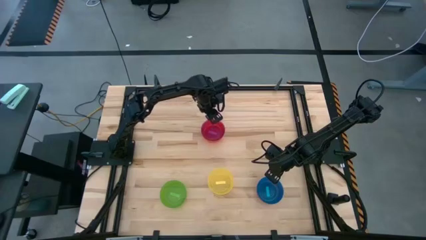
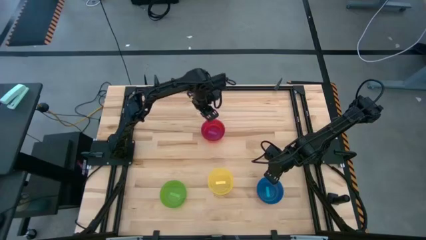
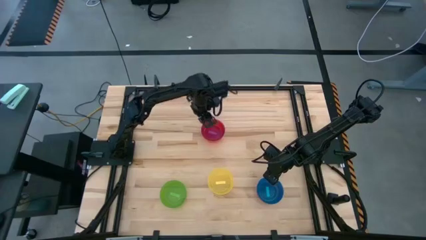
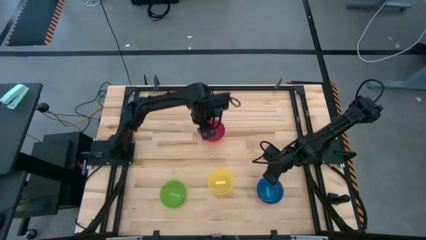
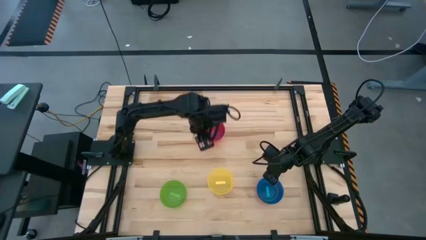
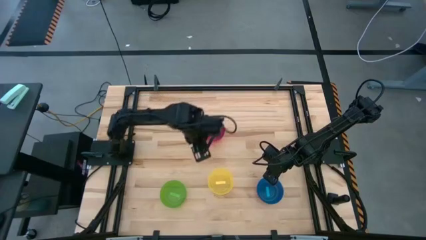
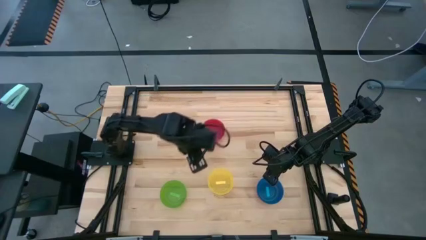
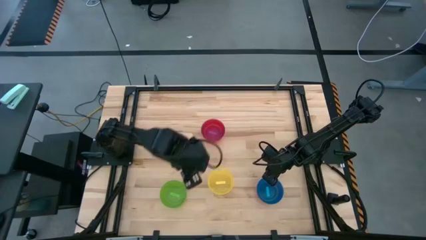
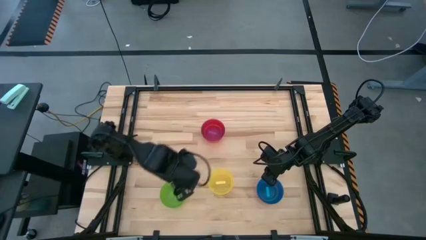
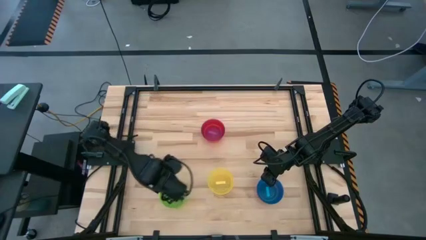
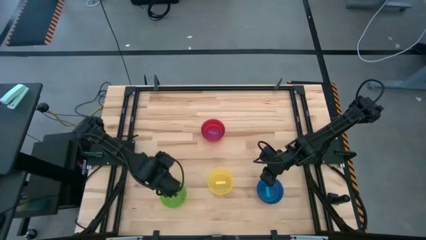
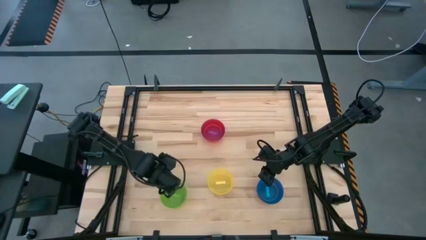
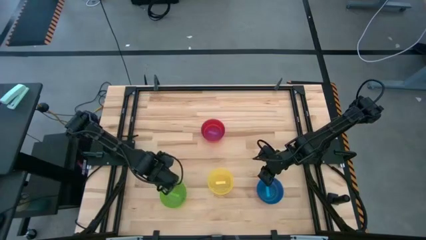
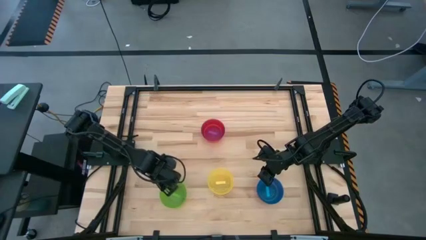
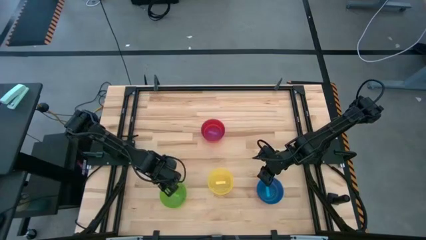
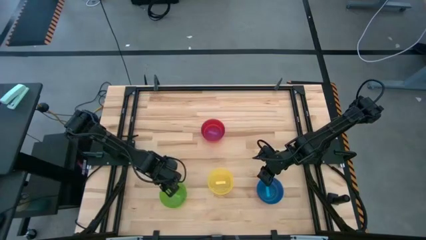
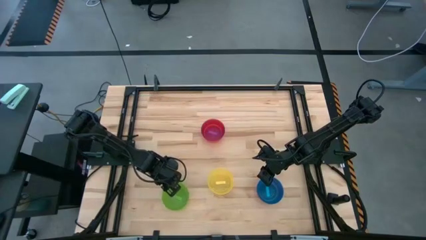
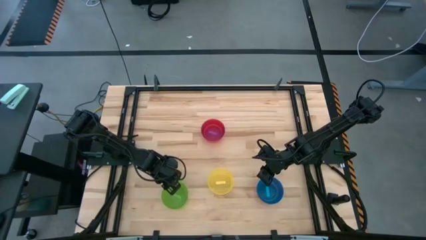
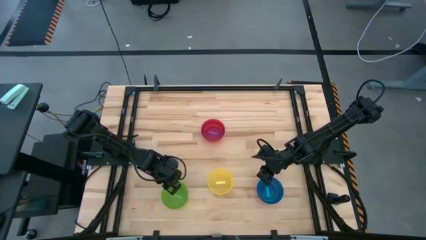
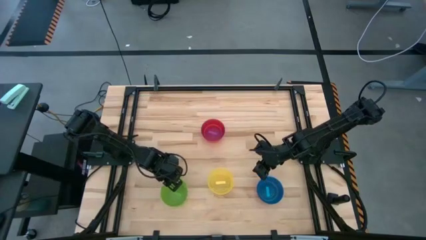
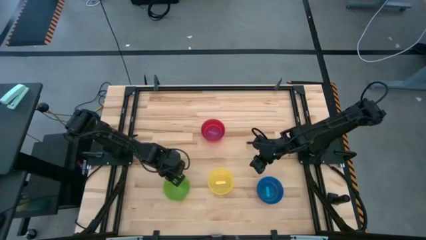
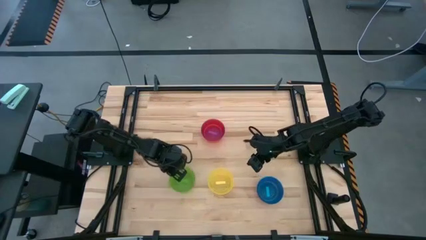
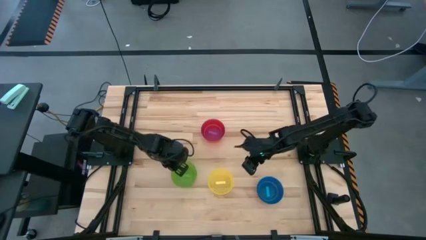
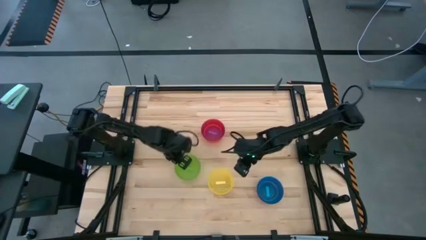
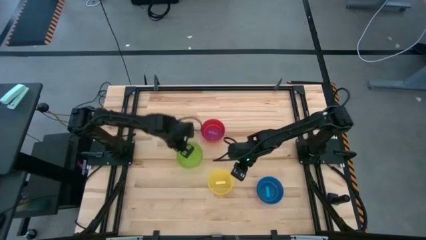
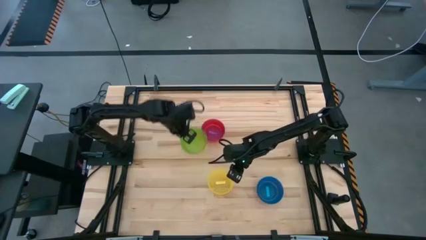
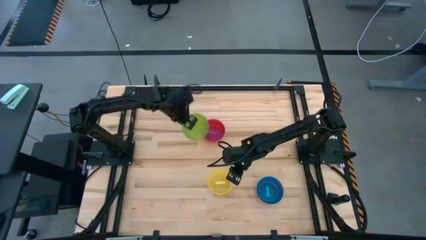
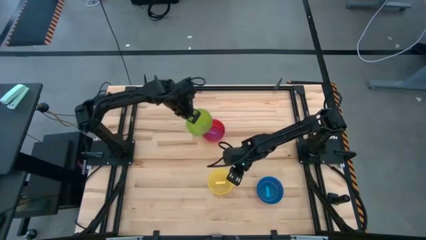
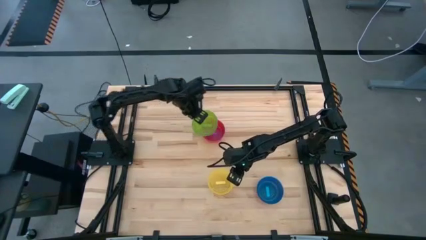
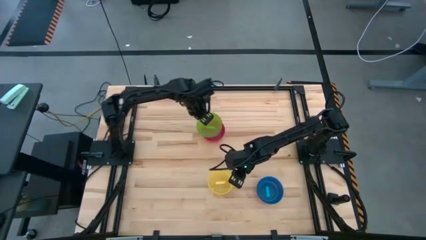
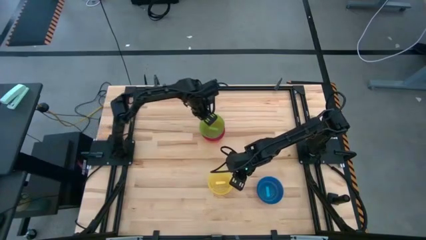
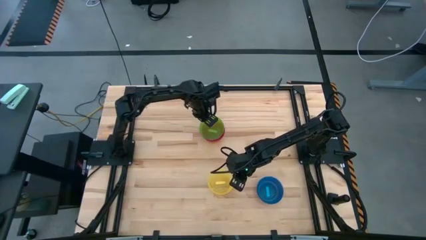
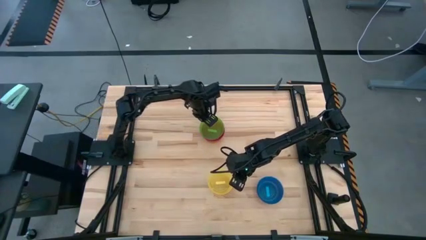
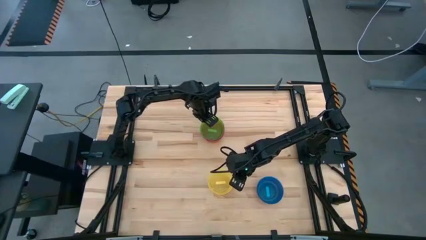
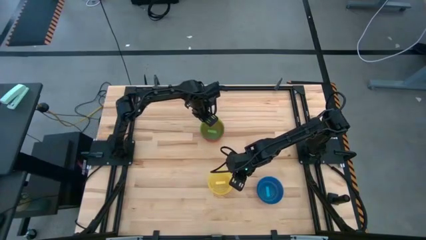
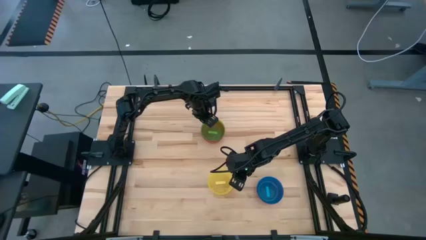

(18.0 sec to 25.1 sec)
Task: Nest bowls inside each other
Stack the green bowl on top of the orange bowl

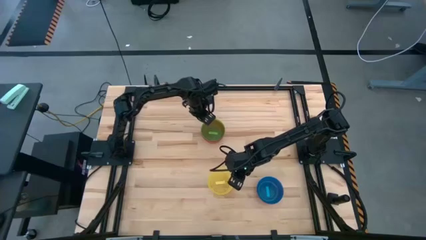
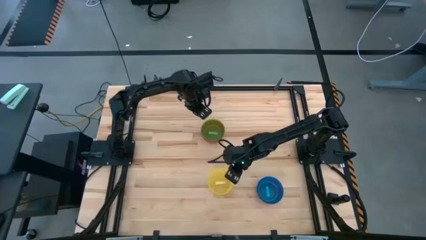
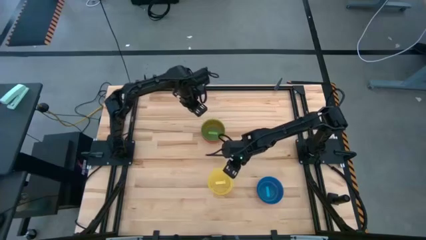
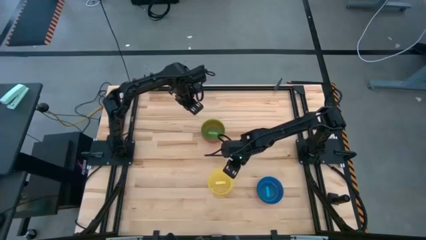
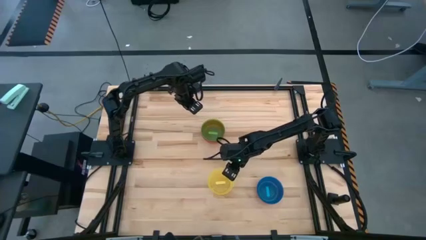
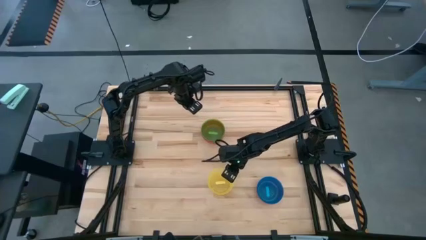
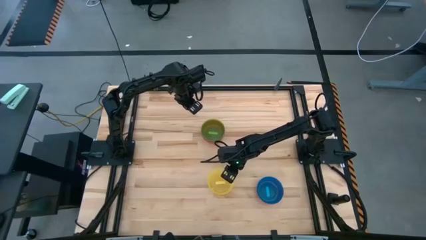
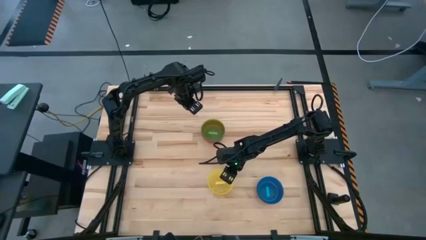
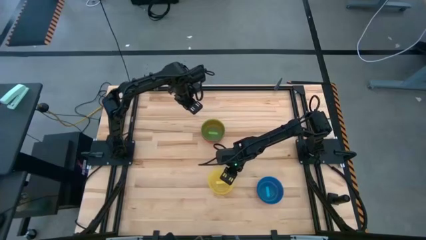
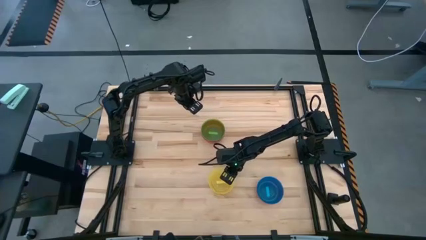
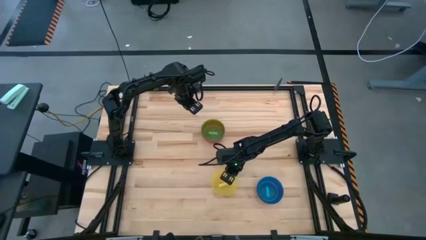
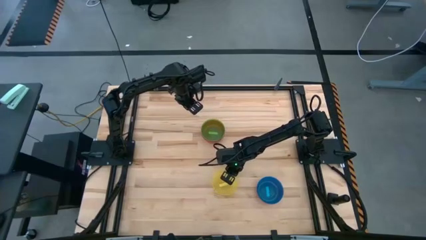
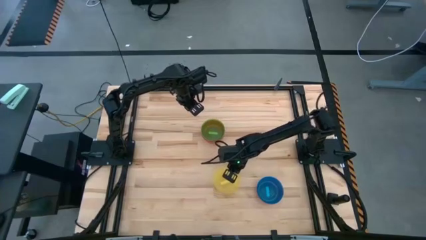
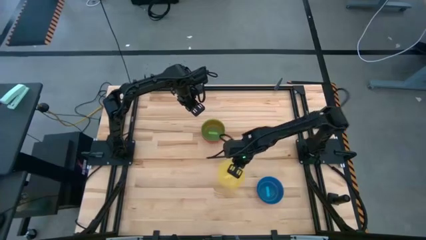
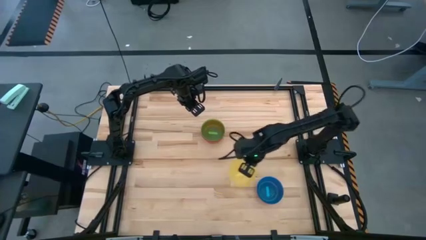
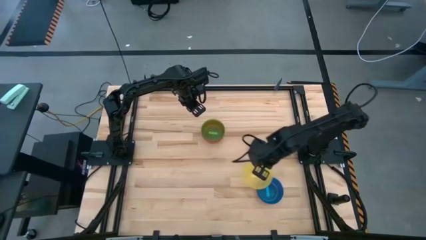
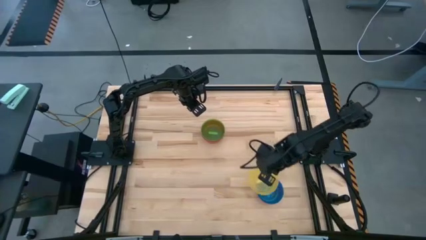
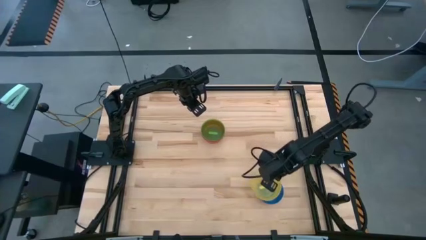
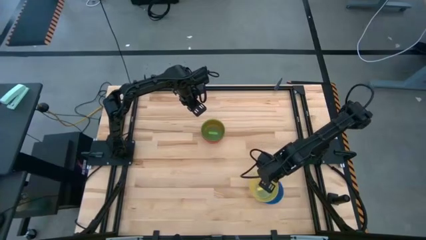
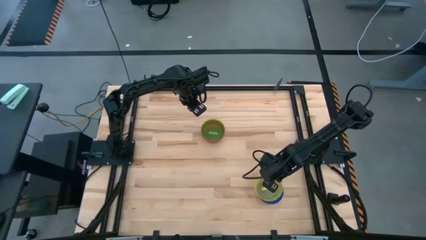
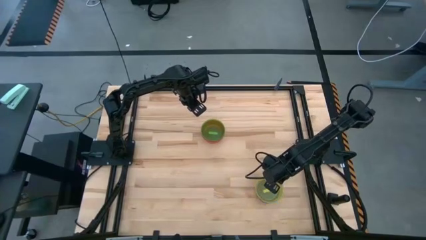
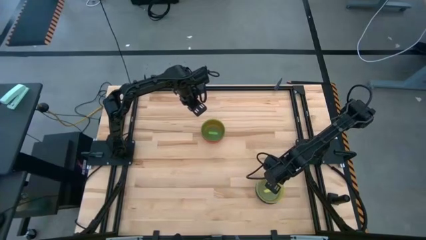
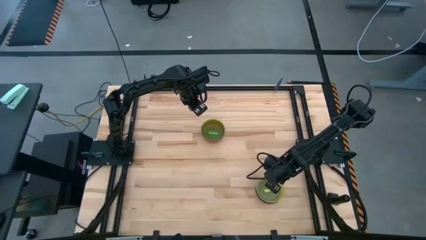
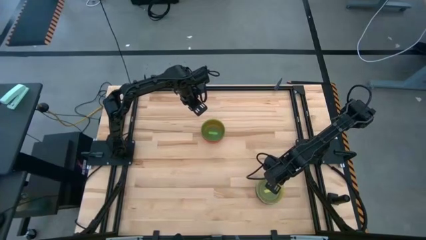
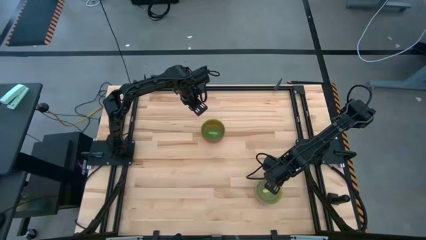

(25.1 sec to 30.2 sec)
Stack the yellow bowl on top of the blue bowl

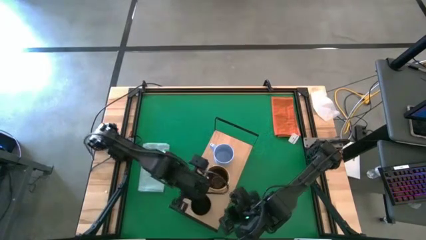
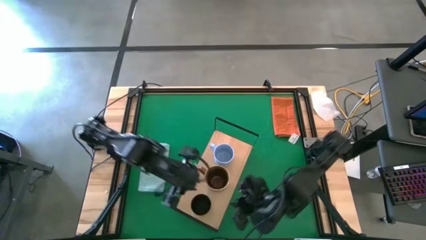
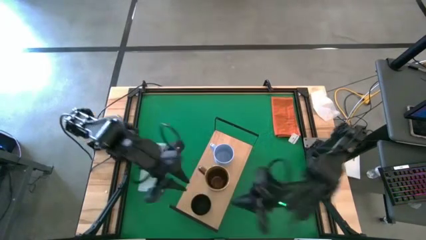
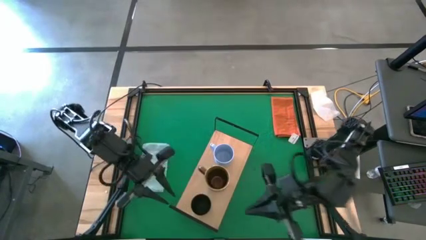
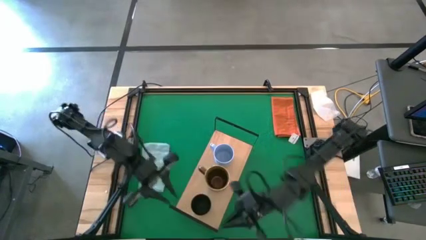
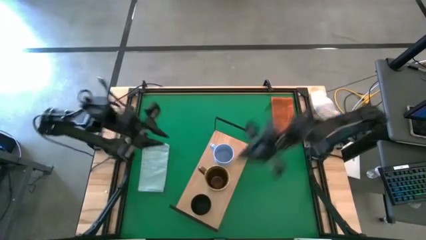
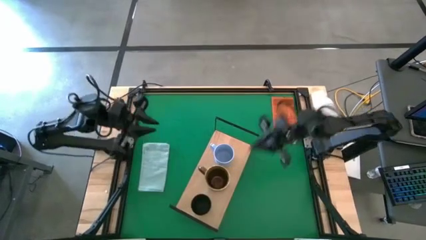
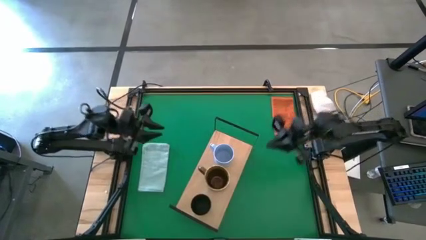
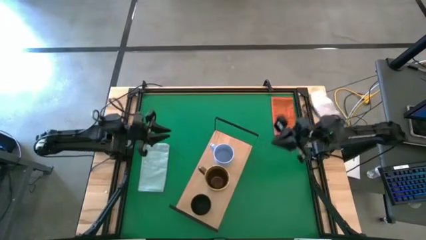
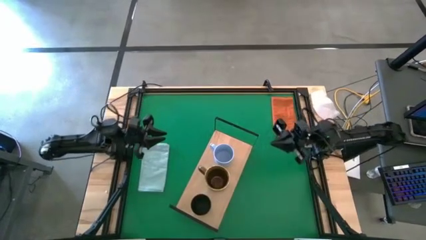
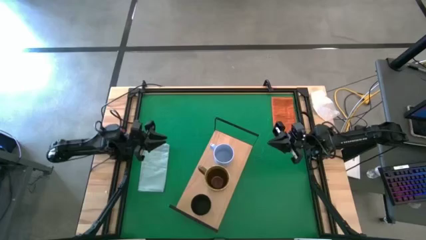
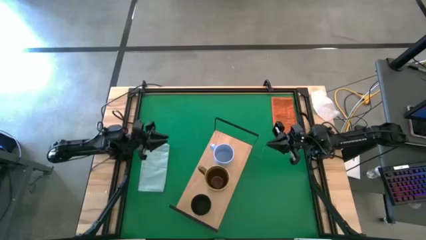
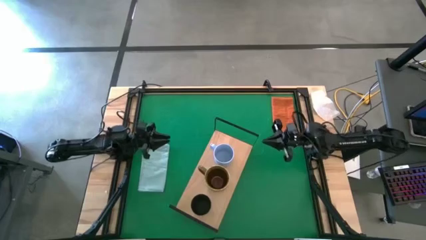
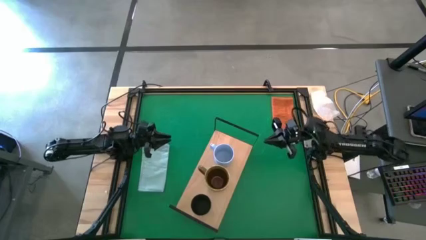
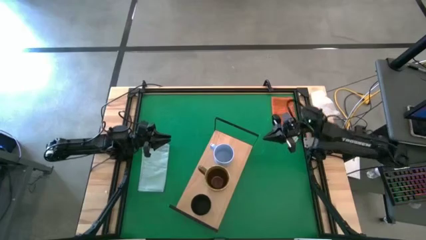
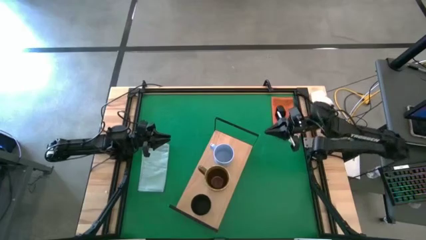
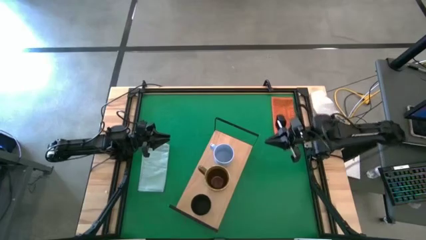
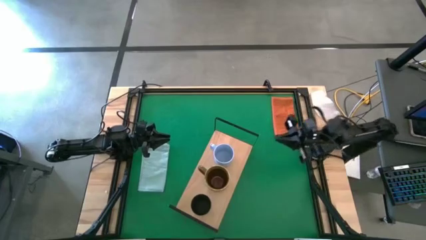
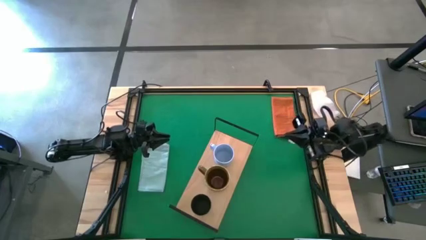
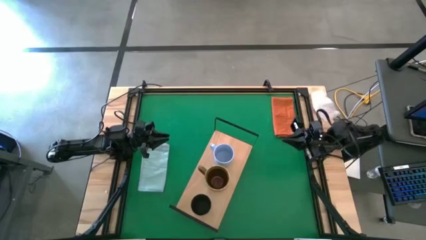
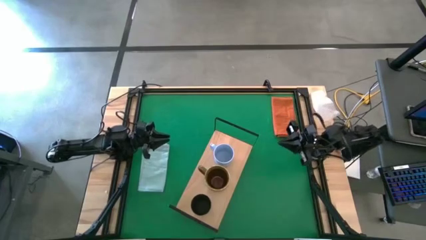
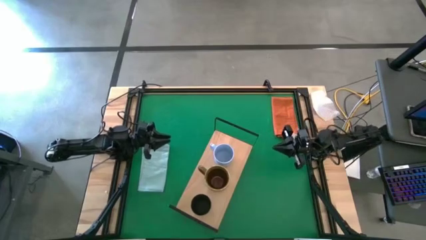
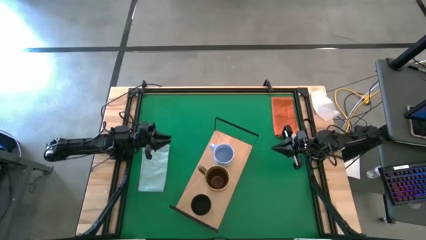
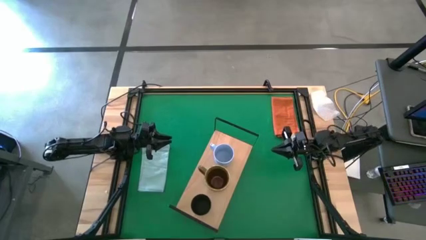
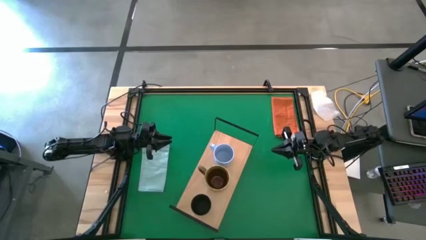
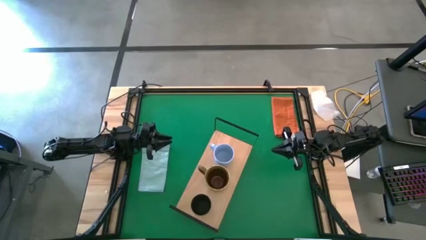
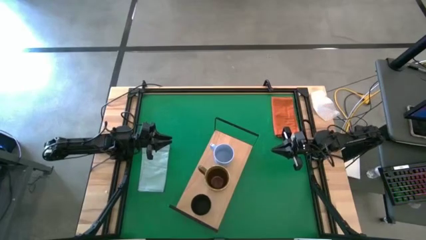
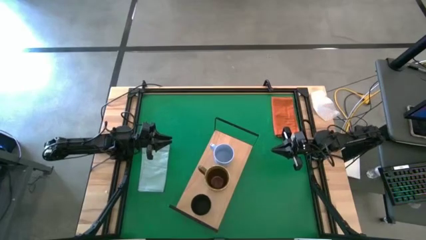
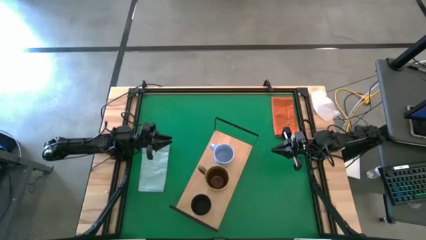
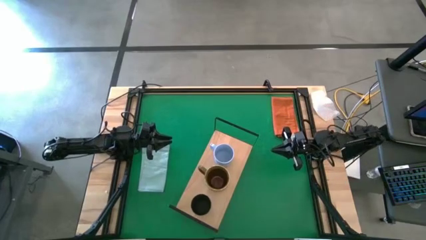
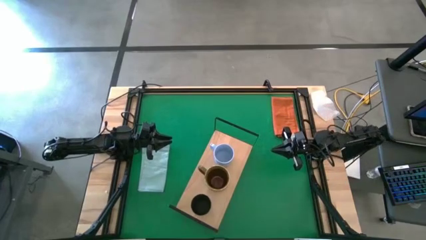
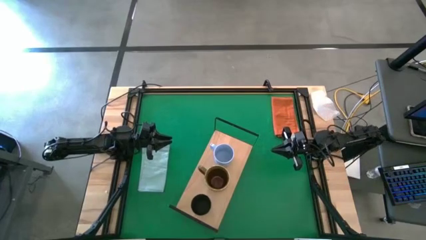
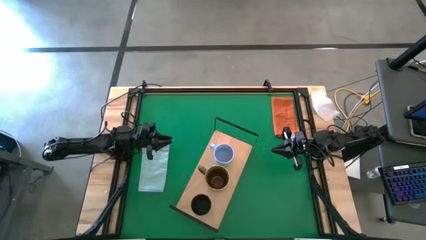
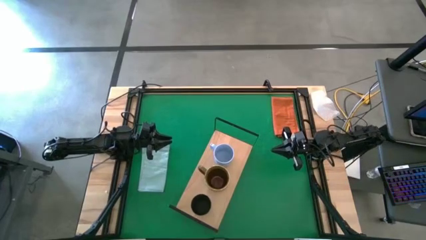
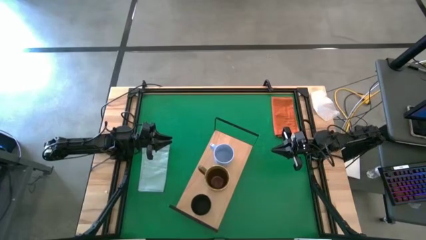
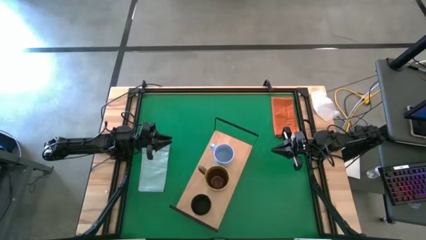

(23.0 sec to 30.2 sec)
Task: Stack small to large cups/mugs on shelf
Return to Home Position
